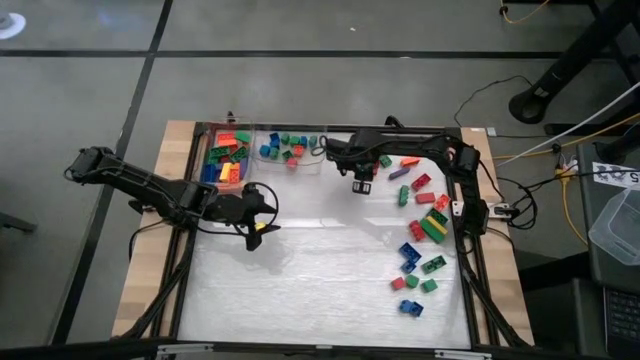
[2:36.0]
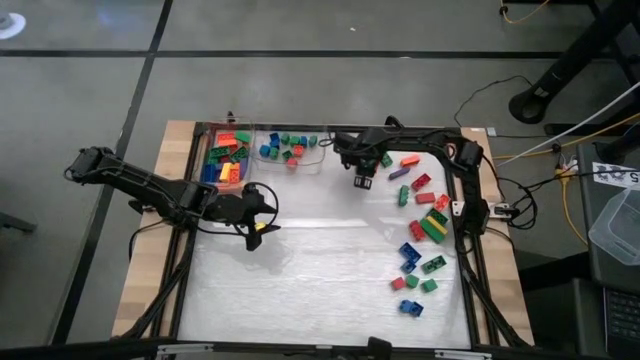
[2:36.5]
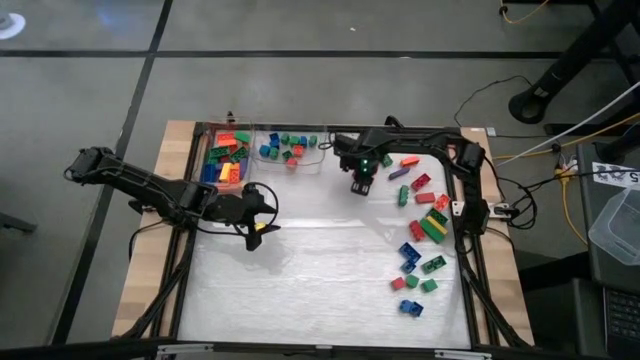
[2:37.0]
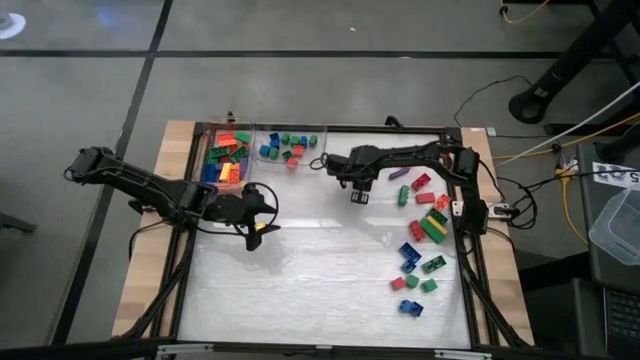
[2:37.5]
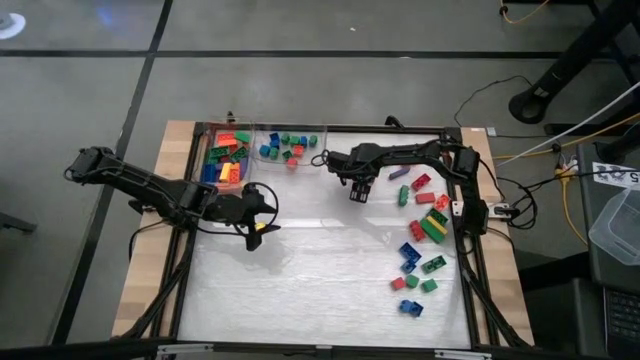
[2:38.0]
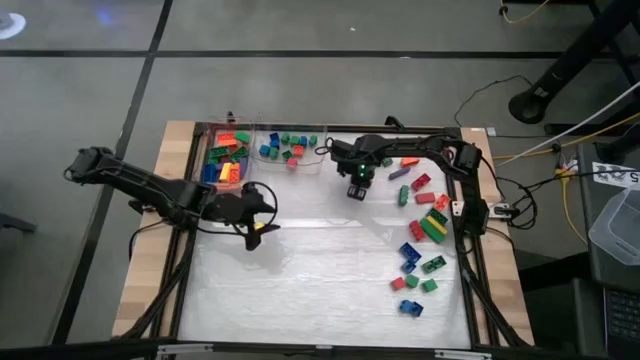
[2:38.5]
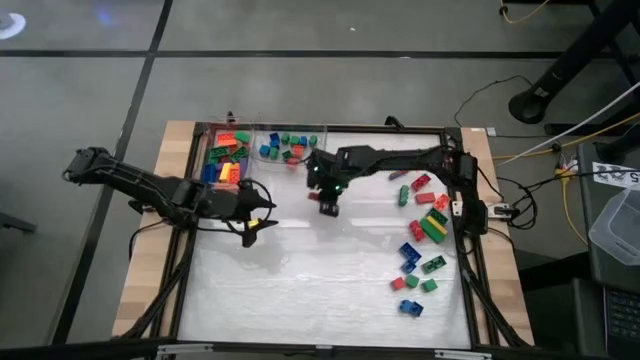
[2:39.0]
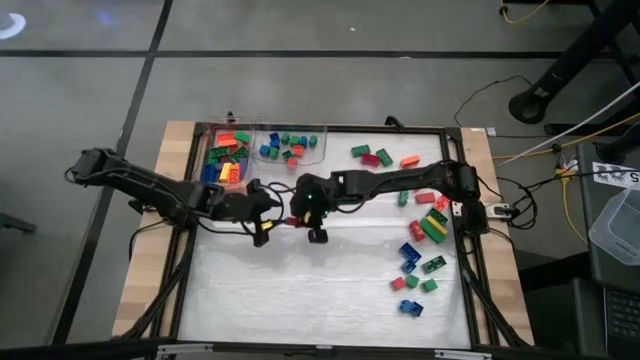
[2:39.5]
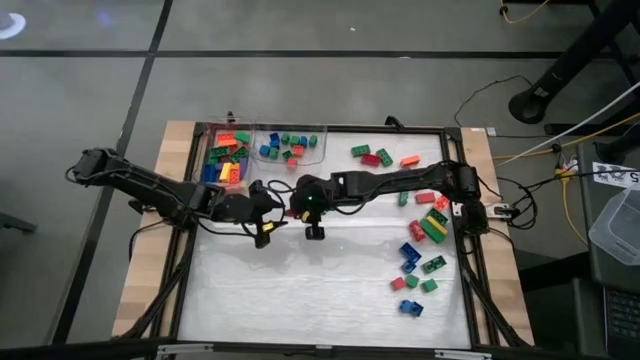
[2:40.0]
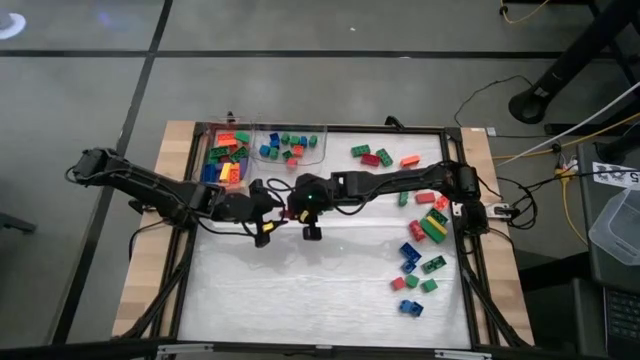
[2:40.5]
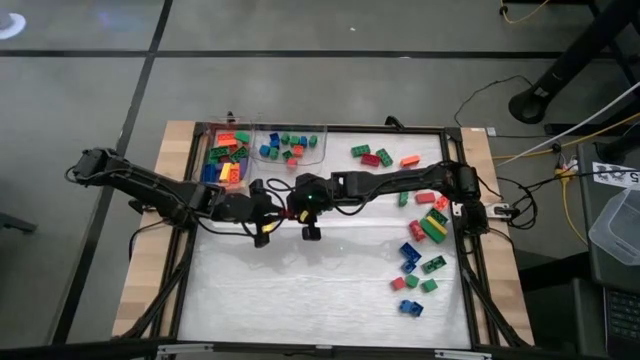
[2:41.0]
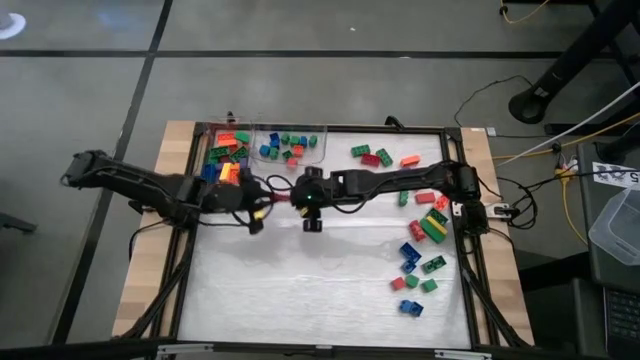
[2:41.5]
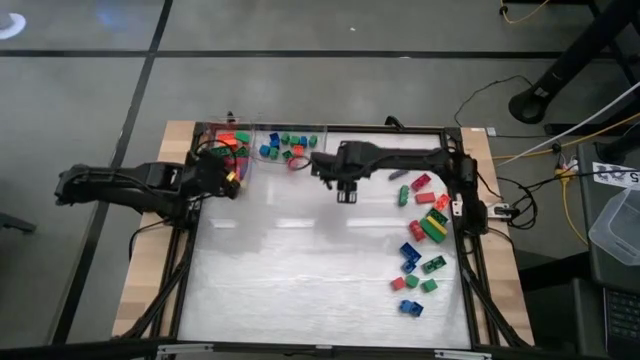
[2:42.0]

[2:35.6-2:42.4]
Task: Sort blocks by size
Put the large red block into the left transparent bin

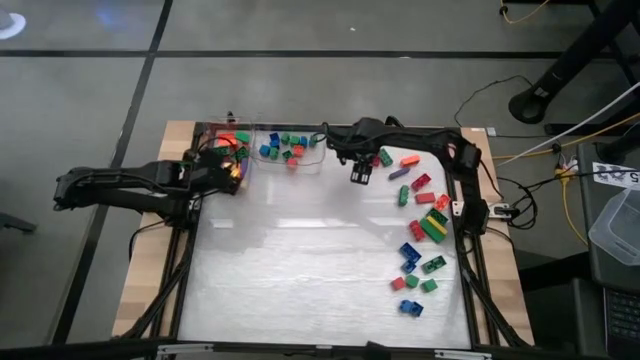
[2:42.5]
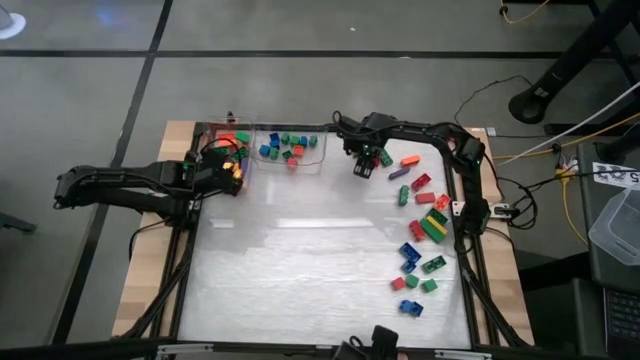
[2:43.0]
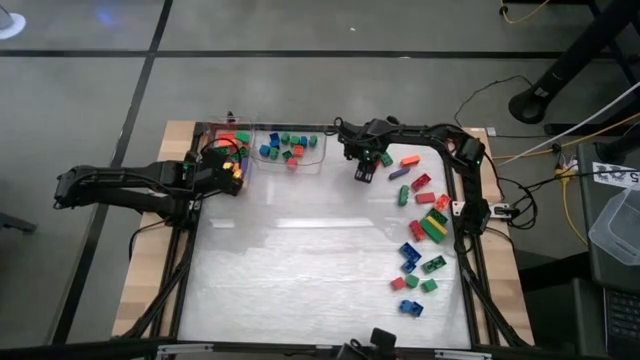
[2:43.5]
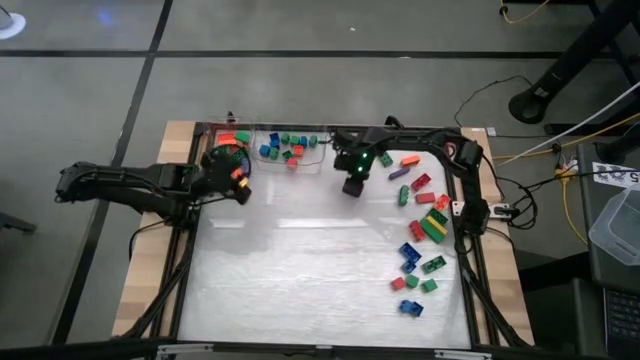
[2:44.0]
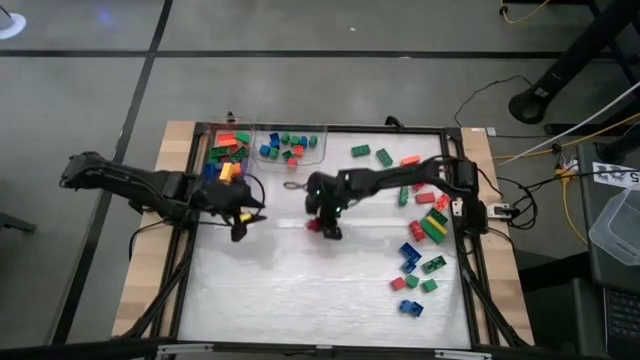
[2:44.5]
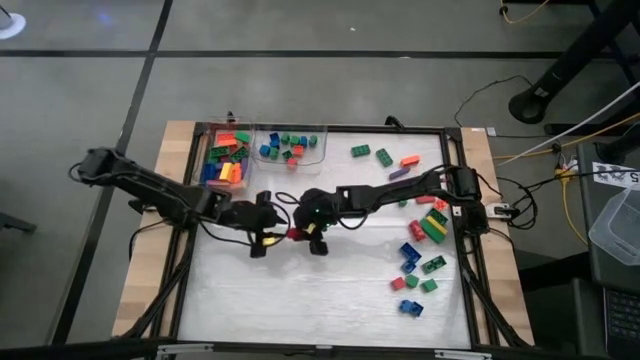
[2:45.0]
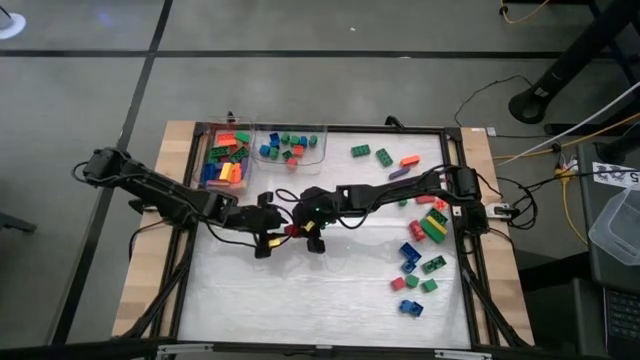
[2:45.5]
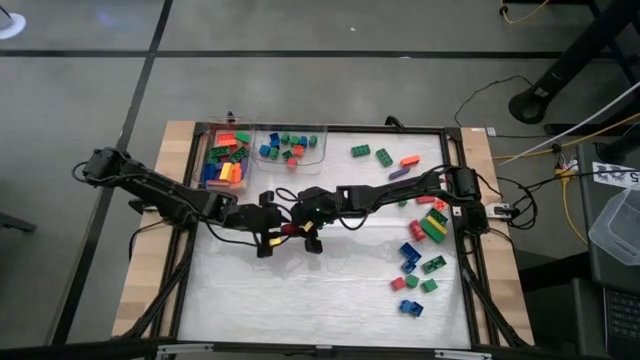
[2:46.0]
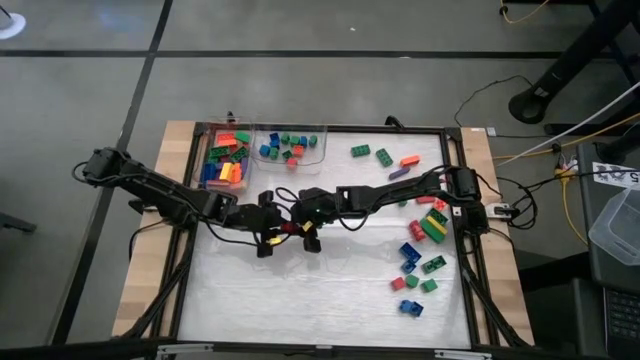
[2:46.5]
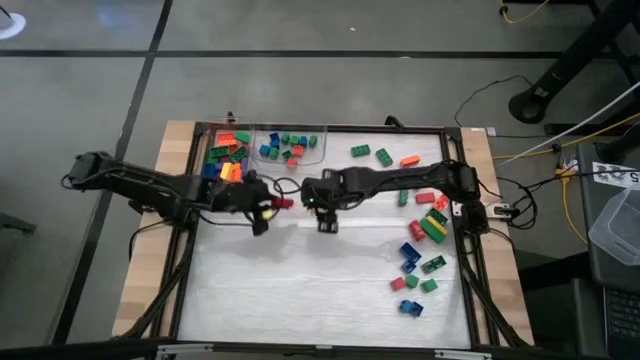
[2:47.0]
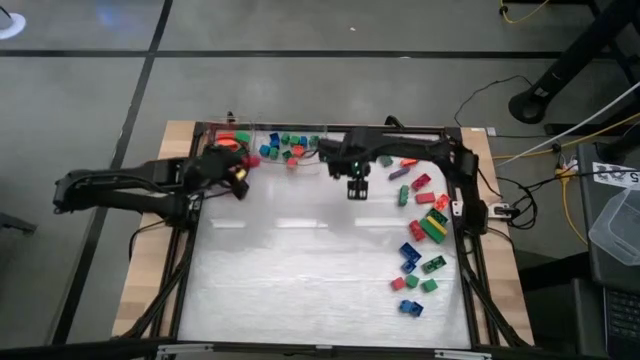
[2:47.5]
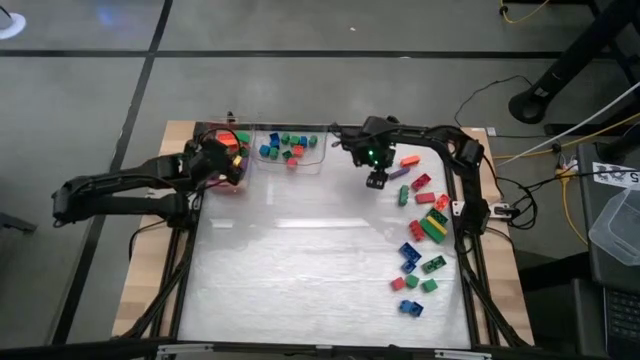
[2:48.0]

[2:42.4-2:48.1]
Put the large red game piece into the left transparent bin

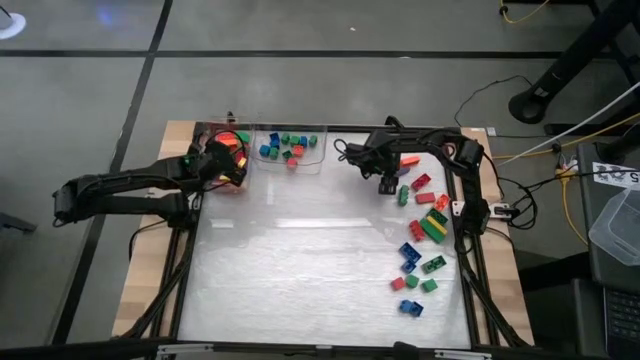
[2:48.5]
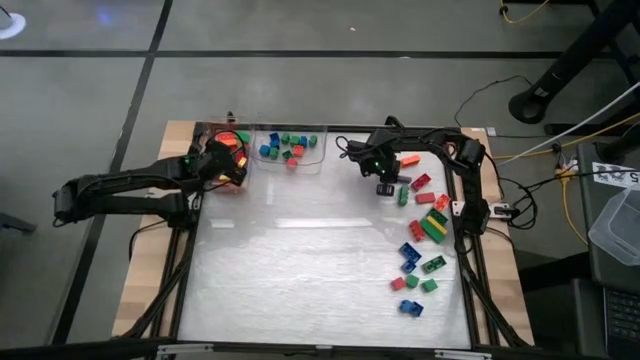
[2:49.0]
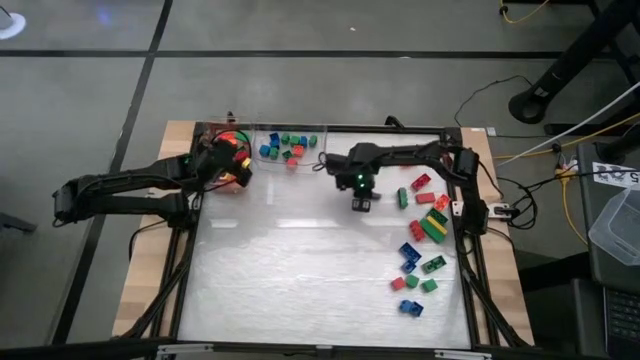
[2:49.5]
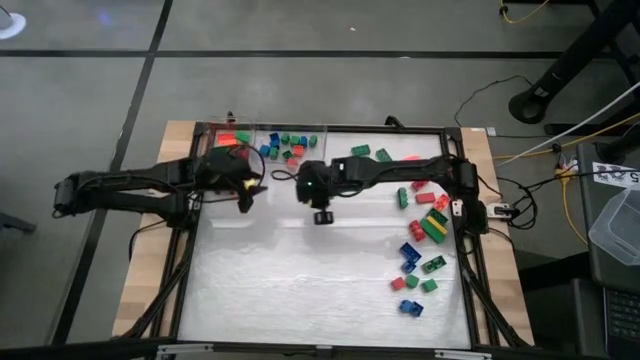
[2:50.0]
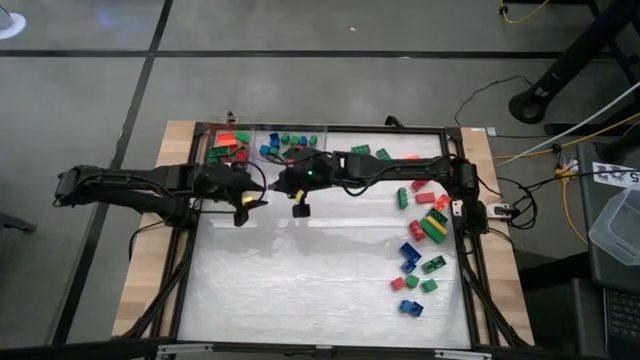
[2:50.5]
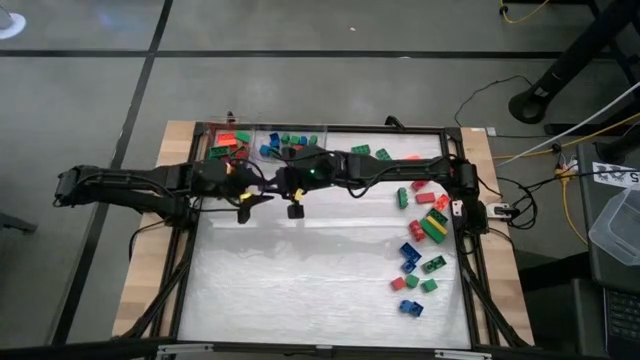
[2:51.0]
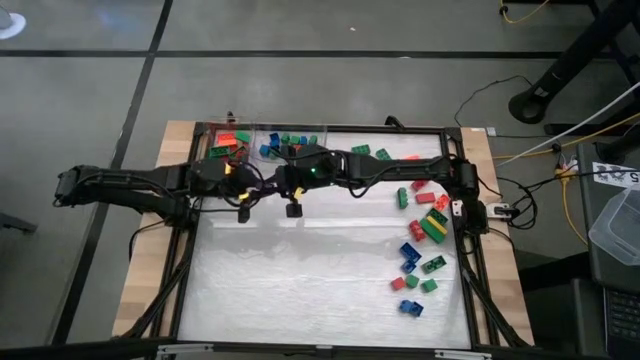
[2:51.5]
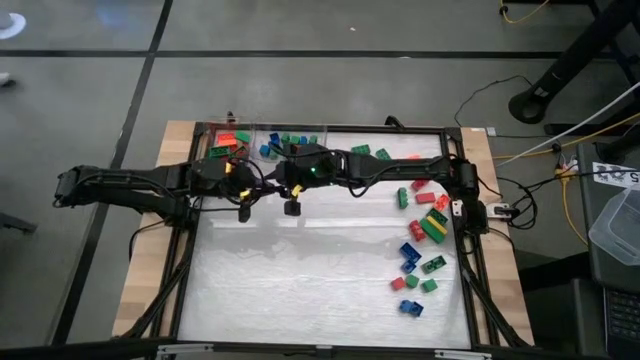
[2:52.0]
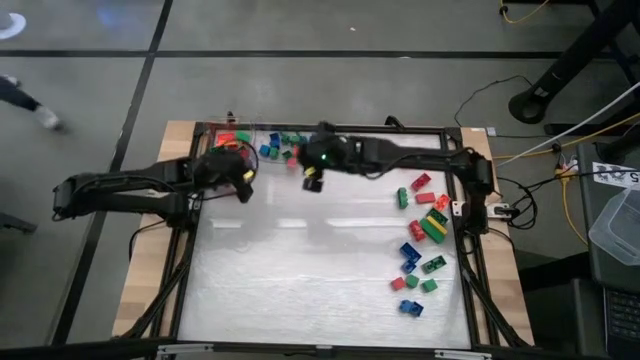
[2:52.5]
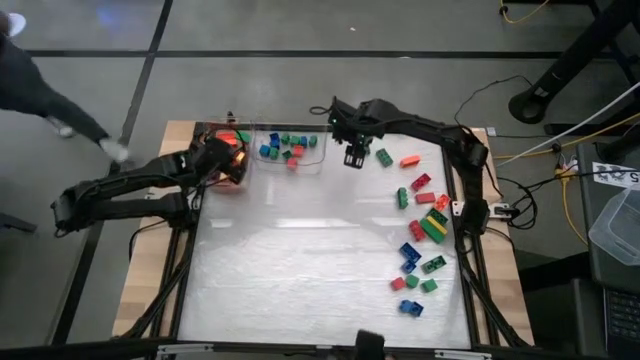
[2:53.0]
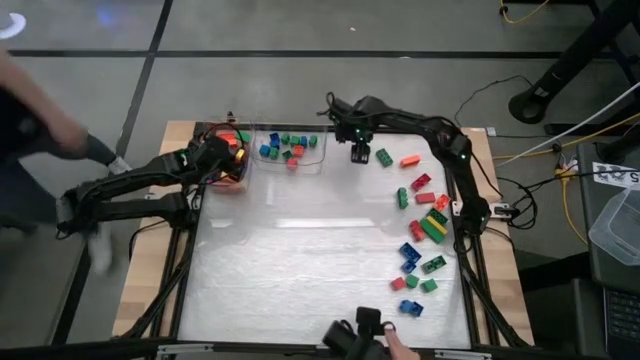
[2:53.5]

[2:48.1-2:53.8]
Put the large purple block into the left transparent bin

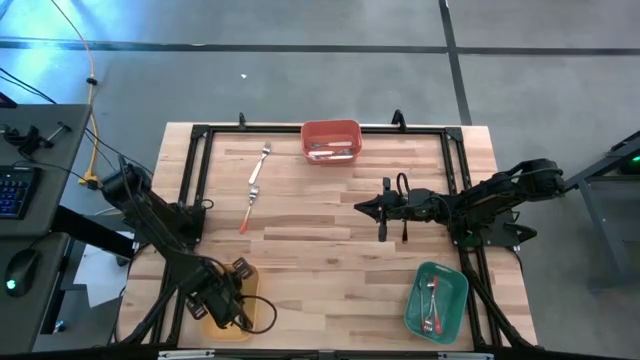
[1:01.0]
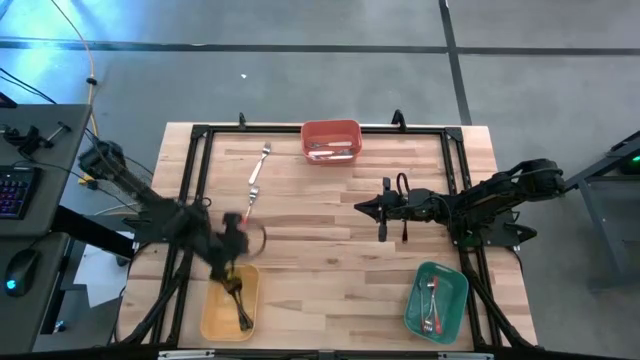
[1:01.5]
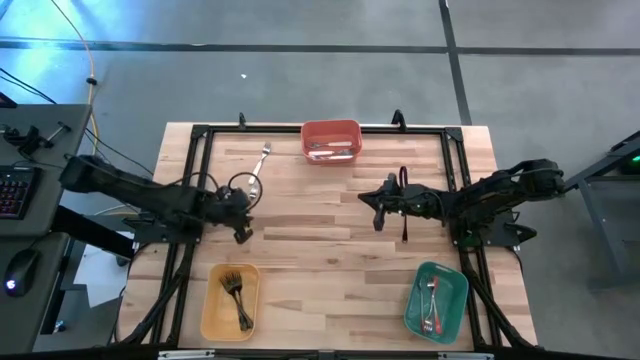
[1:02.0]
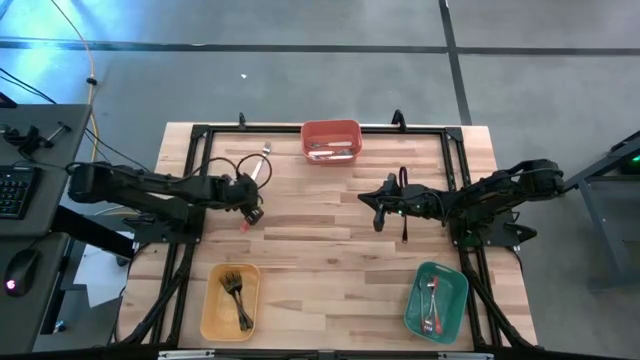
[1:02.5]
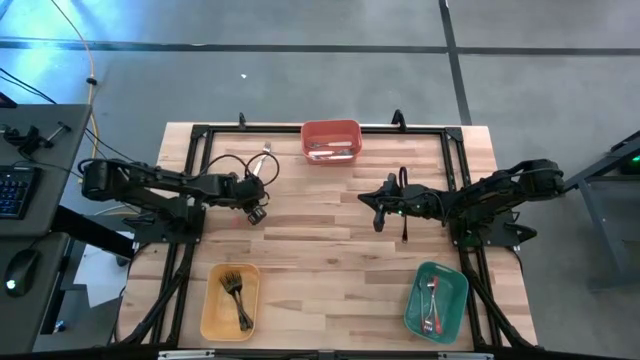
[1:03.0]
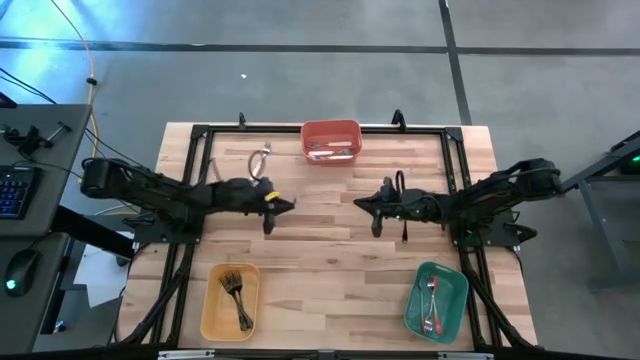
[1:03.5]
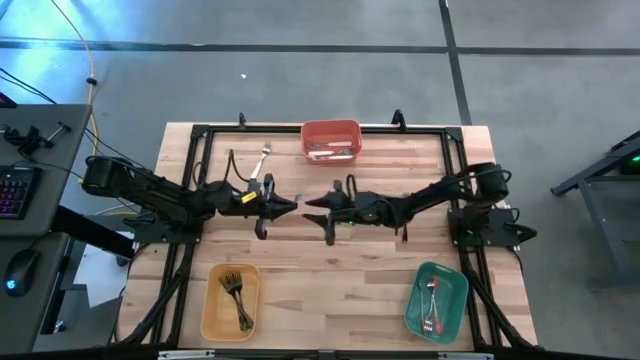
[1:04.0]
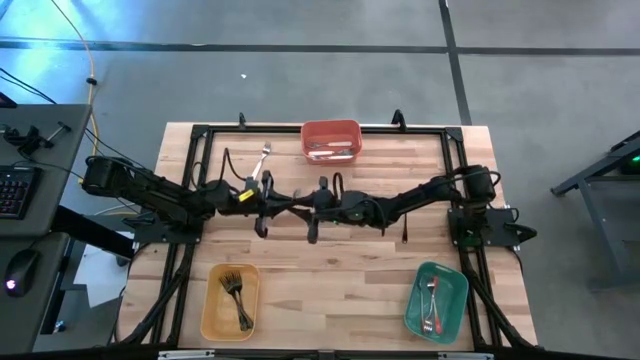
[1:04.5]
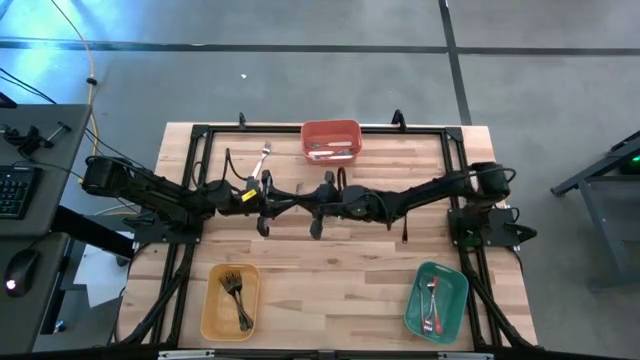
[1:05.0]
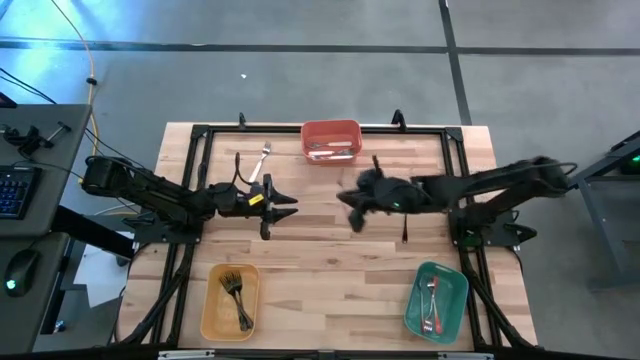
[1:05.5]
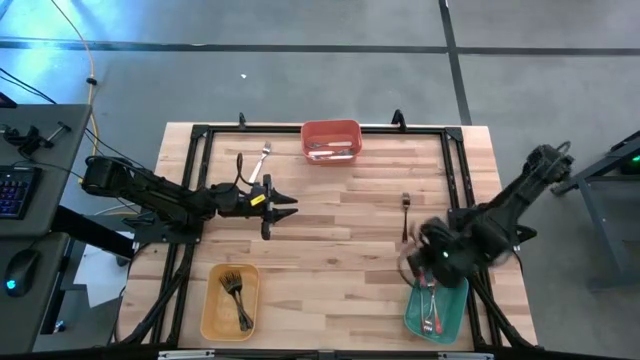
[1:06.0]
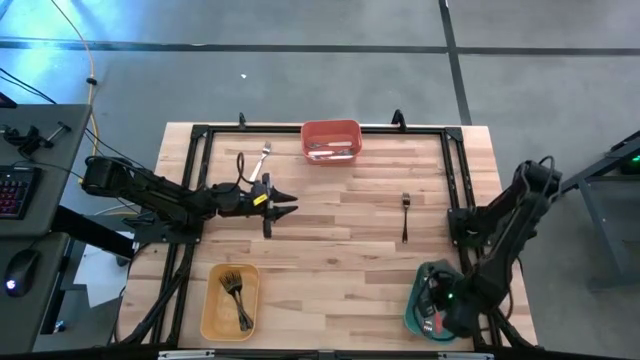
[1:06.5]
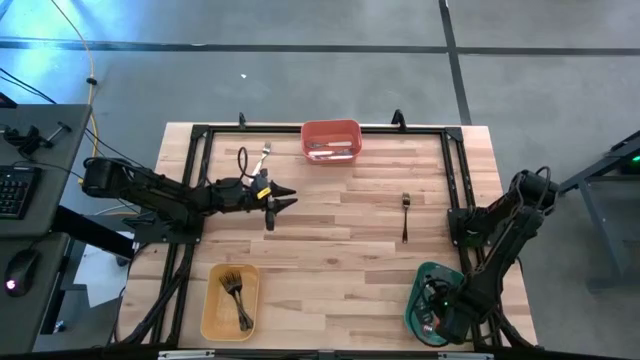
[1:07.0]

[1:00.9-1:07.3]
Task: Sort silverware by color (type)
Put the orange fork into the green bin
